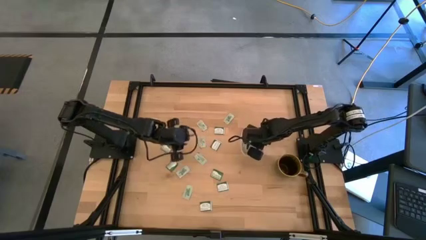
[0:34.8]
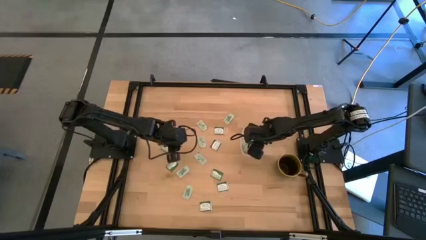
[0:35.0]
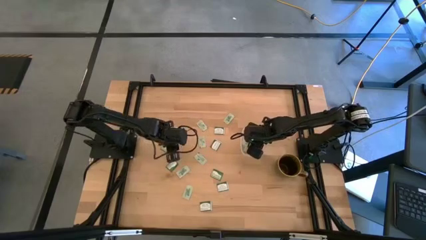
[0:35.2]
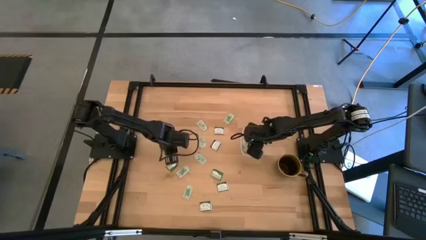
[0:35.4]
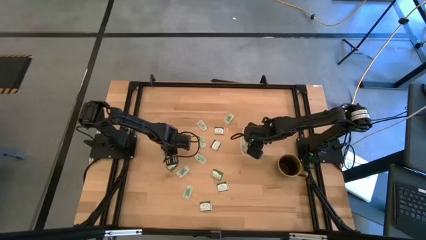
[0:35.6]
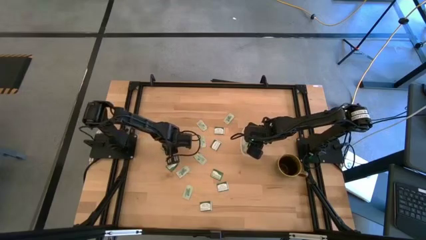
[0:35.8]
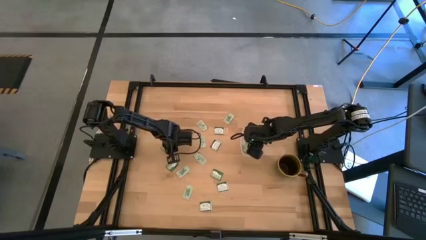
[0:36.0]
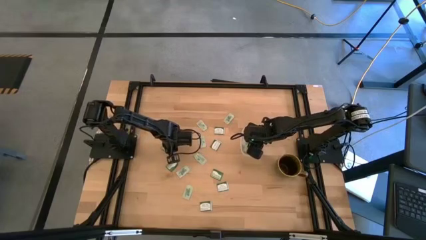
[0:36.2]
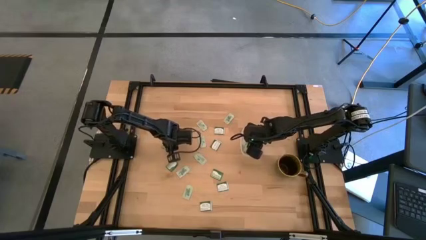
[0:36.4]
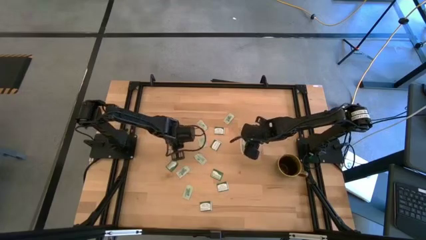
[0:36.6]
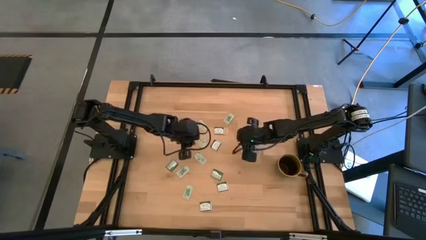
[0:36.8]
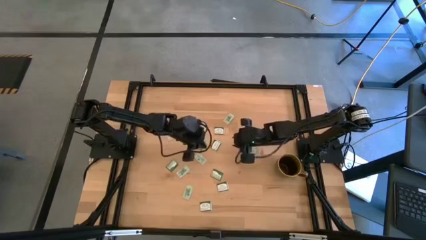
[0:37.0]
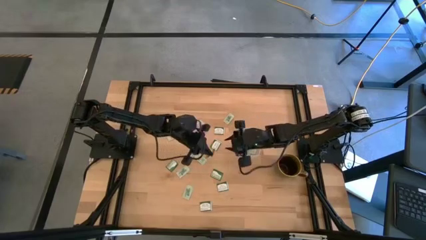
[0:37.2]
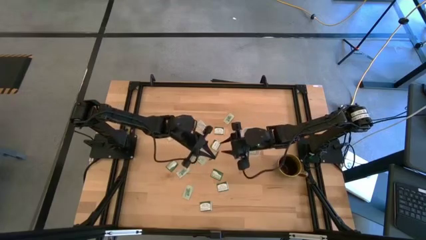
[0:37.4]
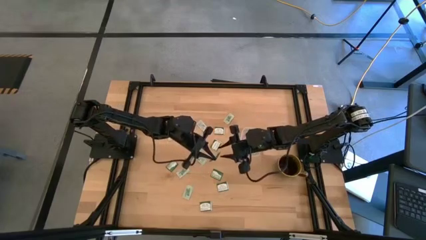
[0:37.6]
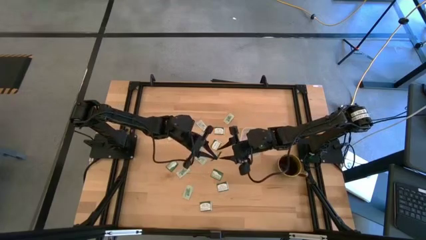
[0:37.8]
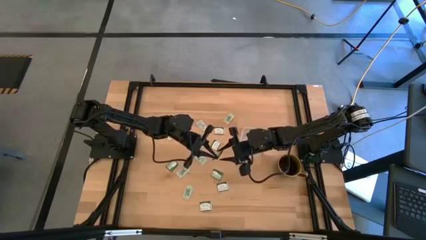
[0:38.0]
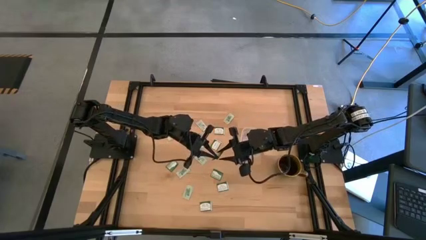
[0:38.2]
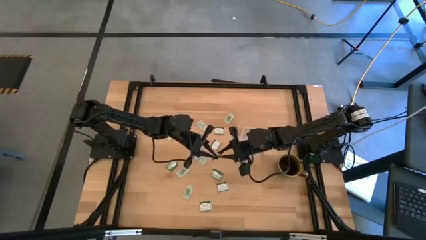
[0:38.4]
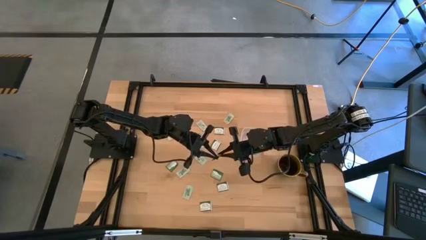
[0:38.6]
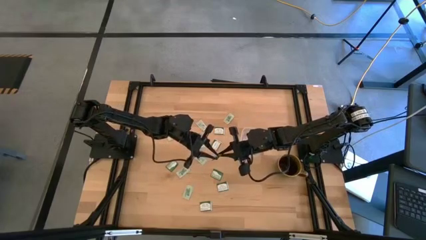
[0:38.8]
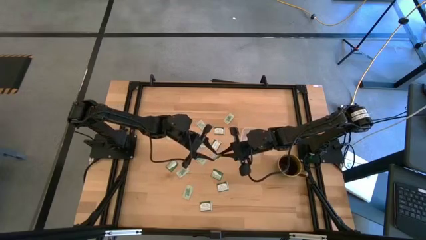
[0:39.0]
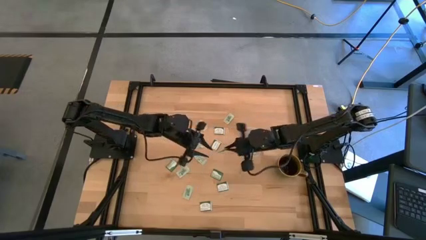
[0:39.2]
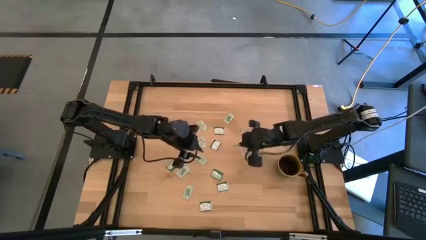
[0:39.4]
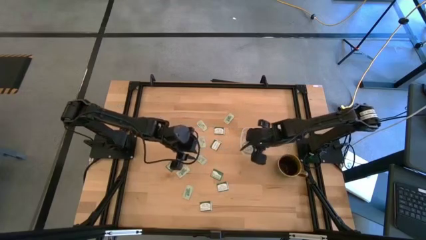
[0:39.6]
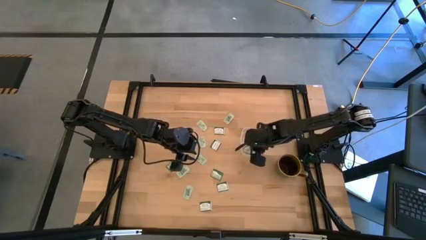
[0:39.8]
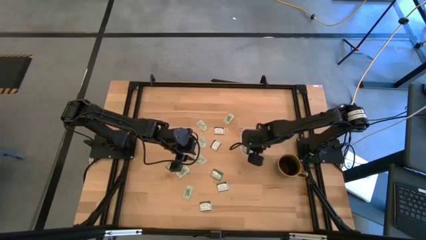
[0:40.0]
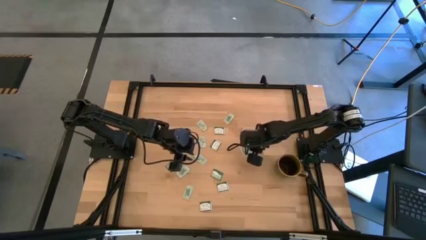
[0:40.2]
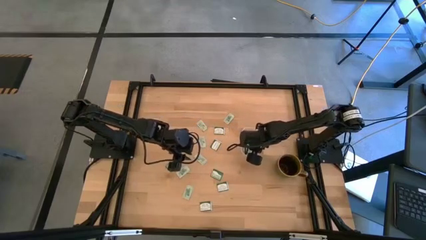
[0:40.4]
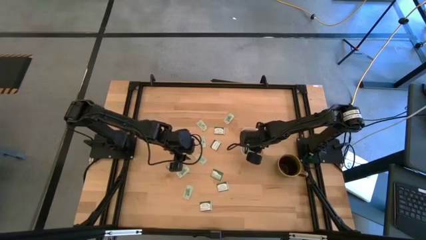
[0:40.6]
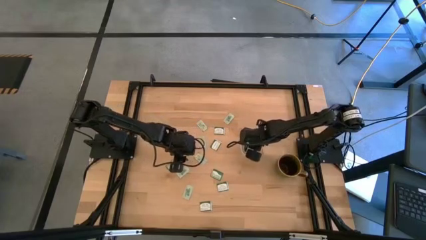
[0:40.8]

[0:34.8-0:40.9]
Task: Pick and place items into bin
Put the truvia packet into the transparent bin

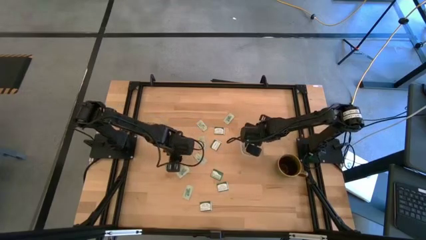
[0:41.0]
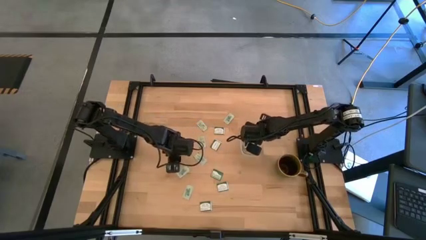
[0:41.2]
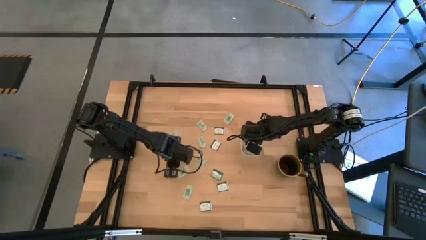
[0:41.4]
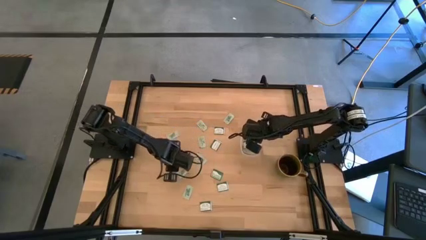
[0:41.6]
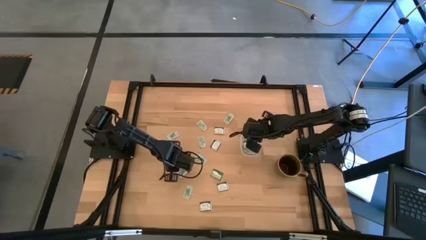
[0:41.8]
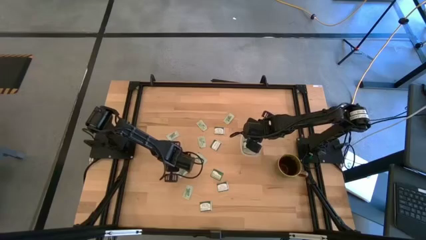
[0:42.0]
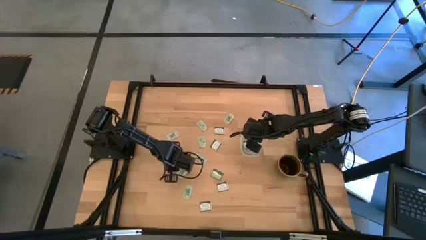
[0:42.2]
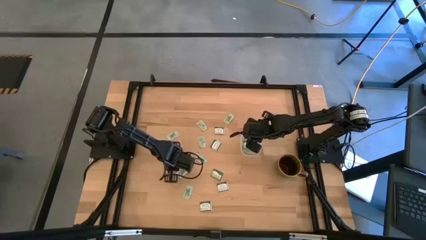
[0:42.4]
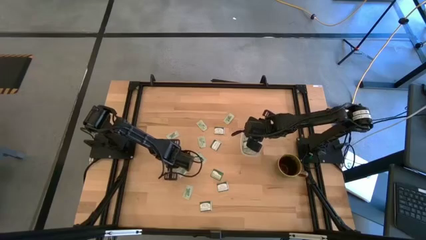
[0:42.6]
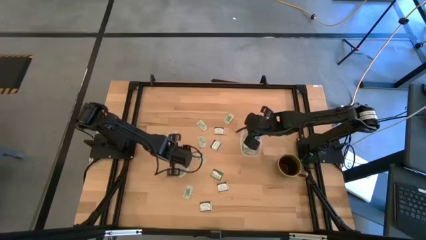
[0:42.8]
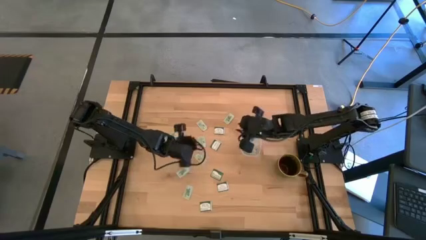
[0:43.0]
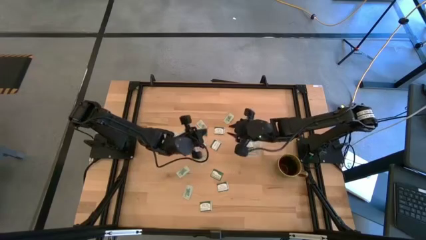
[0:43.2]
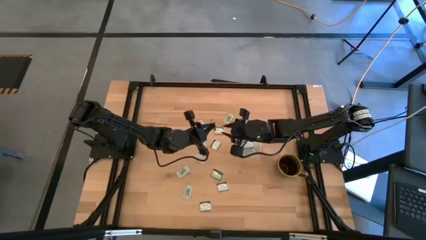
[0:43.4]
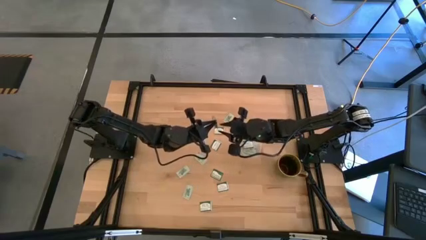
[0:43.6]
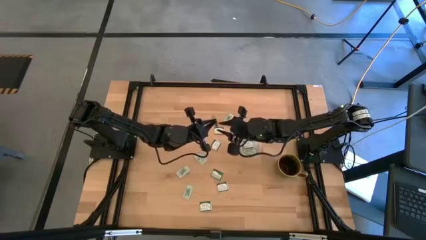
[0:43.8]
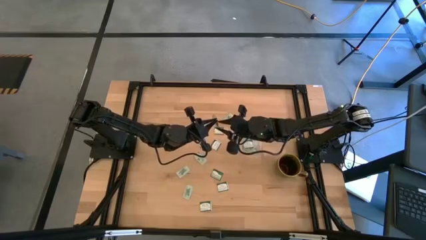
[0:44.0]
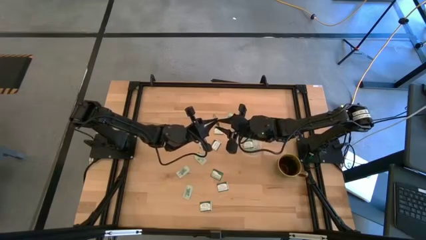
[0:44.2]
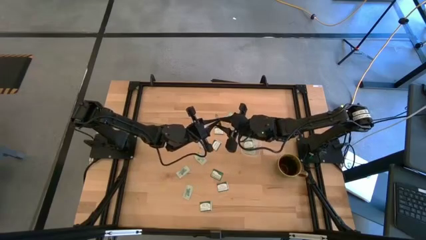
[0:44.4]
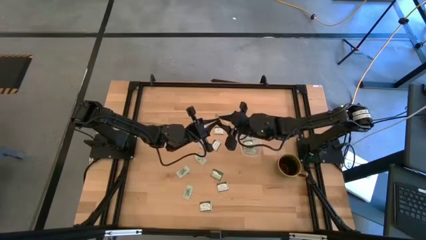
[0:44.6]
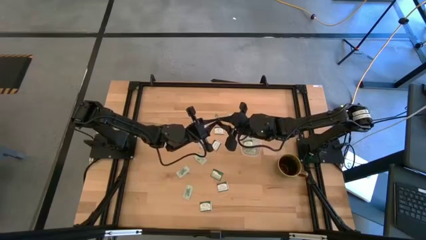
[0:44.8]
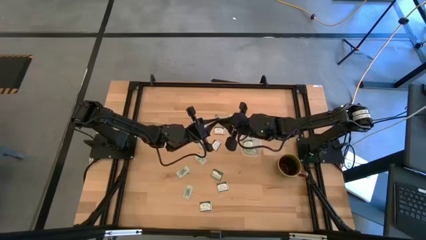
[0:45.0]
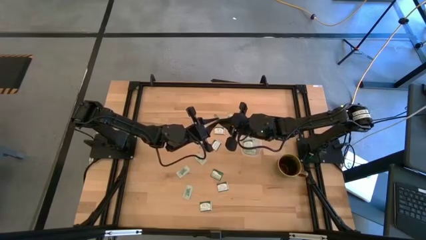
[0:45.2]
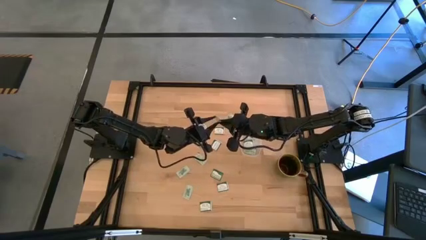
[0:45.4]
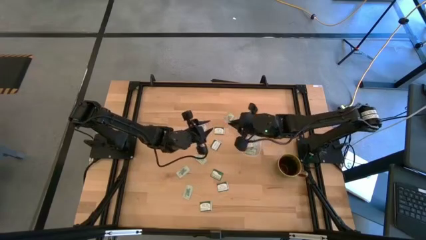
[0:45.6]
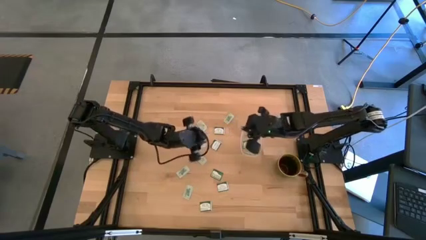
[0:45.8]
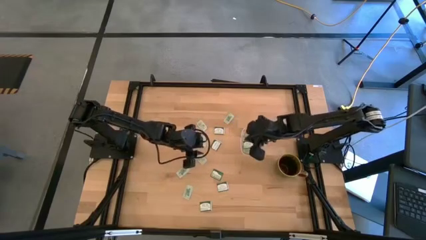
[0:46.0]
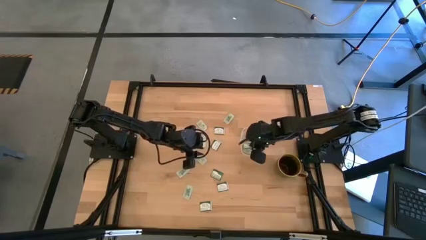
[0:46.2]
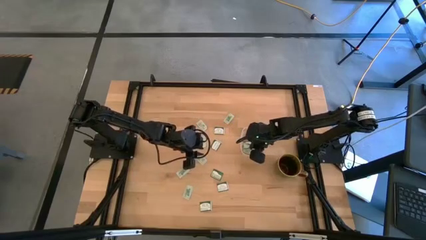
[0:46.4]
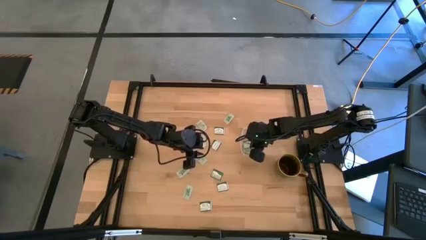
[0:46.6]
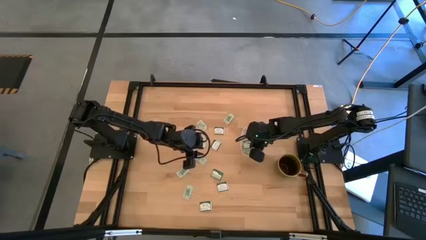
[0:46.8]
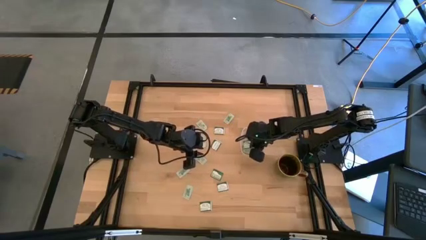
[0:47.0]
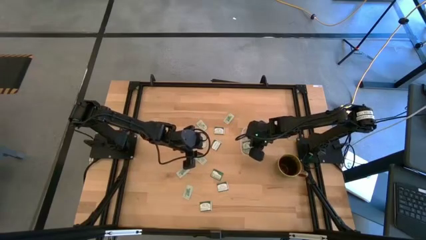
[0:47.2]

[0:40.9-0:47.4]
Put the truvia packet into the transparent bin

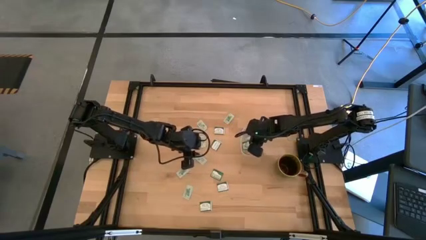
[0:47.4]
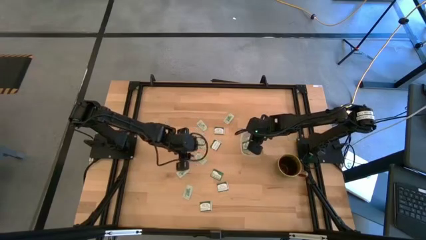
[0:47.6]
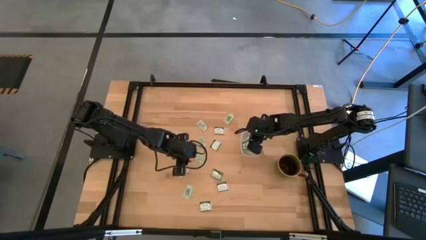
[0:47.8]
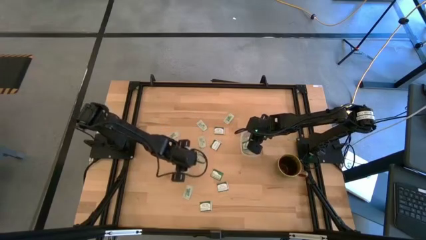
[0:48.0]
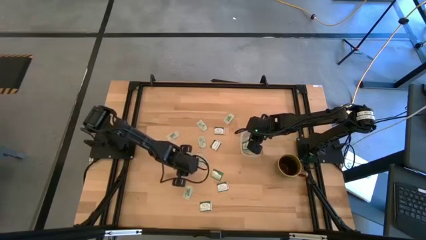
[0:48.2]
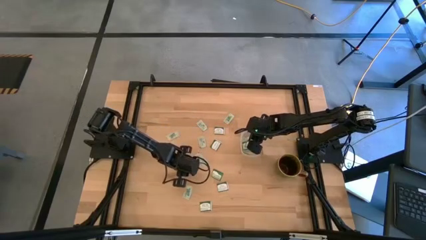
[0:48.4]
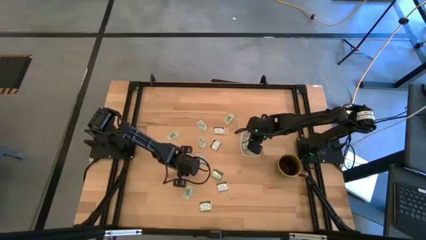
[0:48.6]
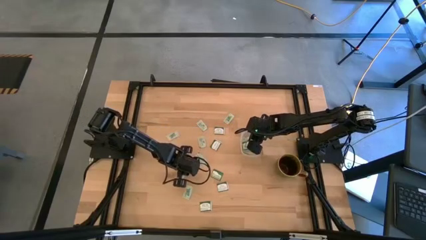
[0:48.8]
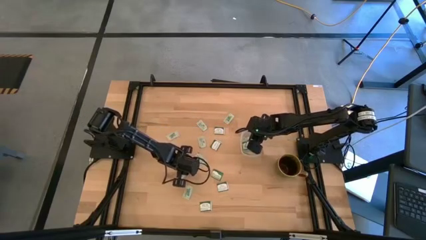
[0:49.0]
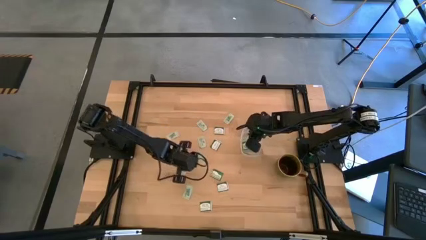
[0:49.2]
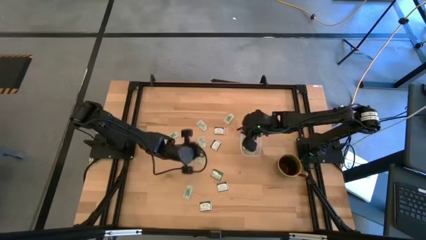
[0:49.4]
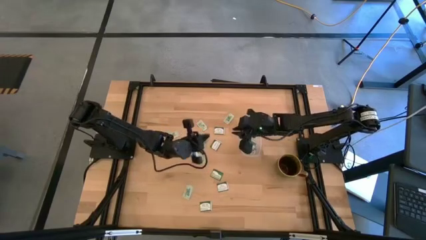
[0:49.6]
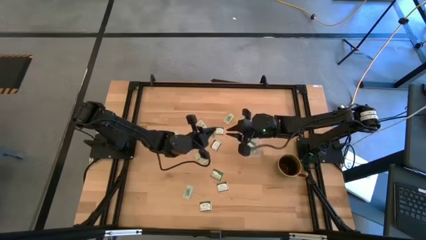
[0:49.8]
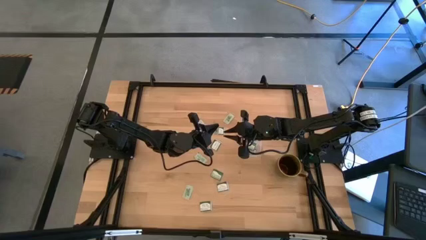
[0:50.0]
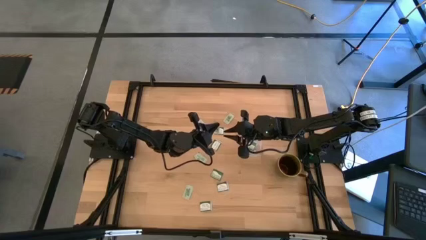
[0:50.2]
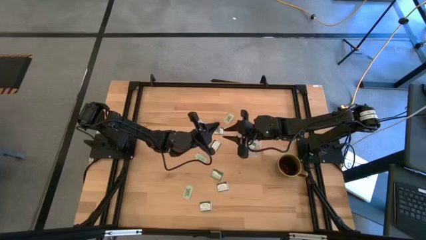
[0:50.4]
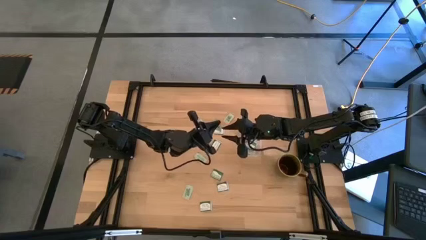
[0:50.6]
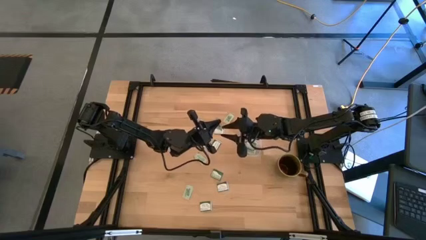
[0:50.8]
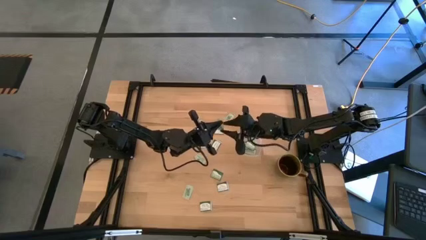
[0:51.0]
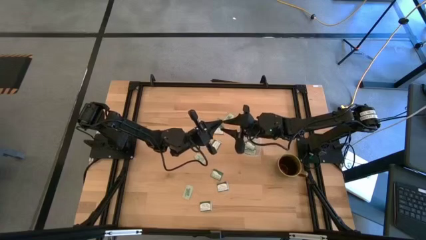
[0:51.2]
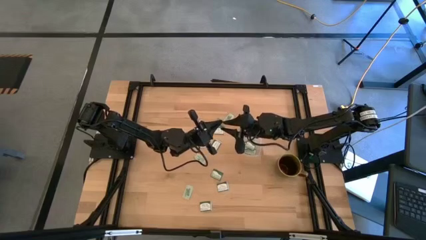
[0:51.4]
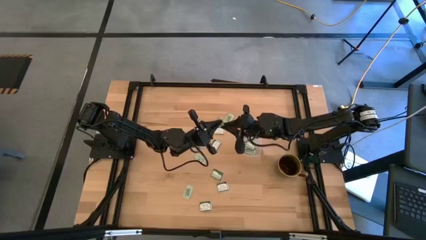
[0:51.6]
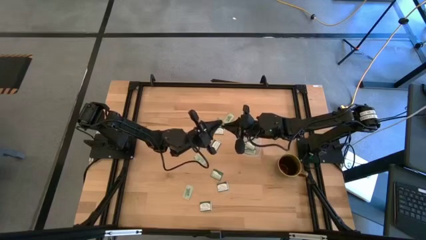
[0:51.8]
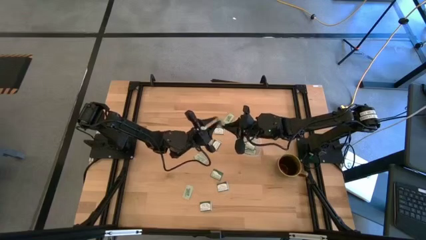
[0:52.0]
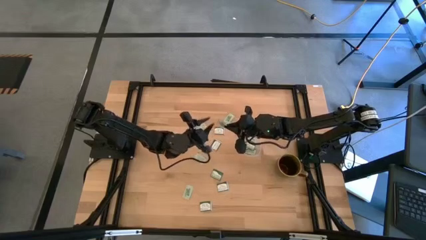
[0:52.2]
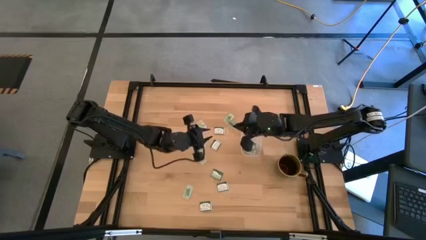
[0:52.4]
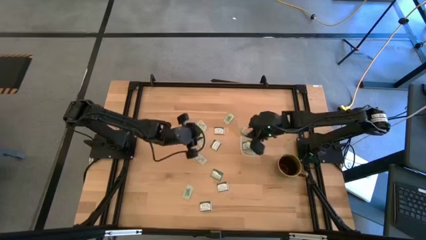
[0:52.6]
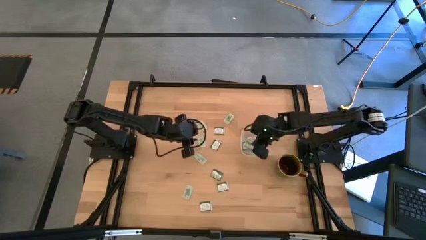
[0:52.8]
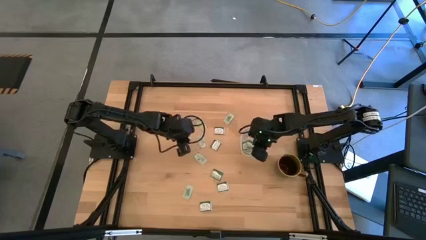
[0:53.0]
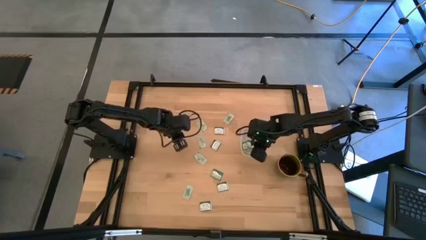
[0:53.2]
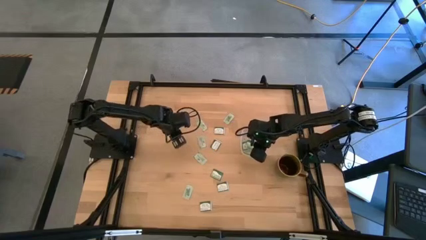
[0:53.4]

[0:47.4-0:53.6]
Put the stevia packet into the transparent bin
